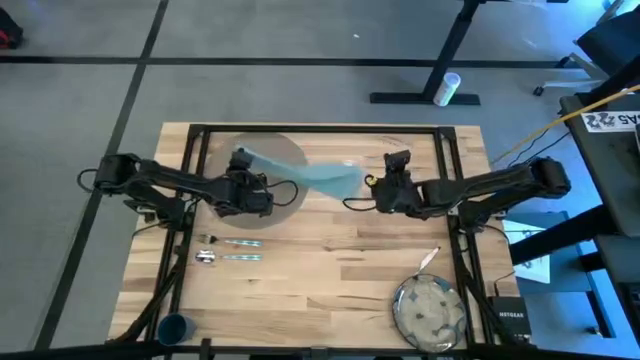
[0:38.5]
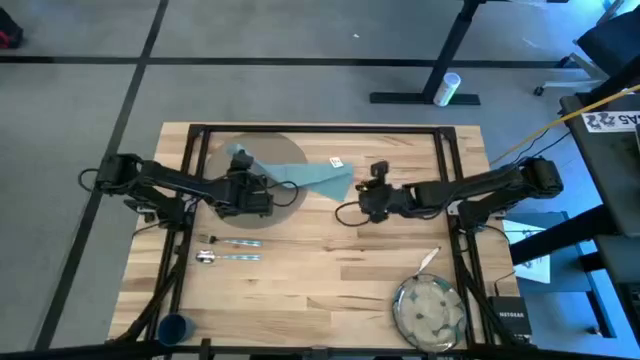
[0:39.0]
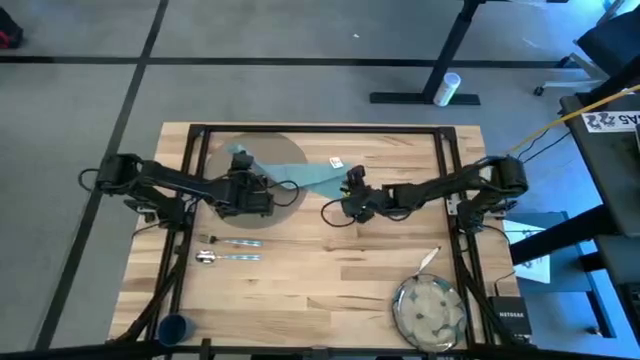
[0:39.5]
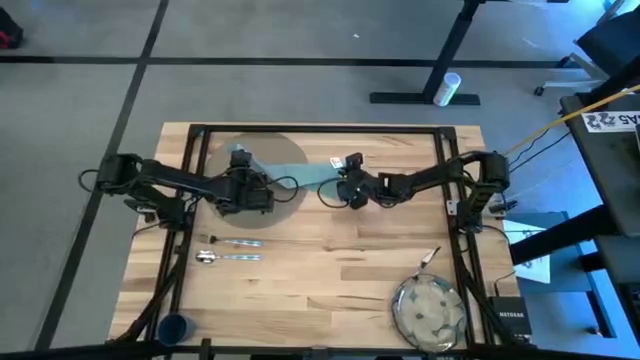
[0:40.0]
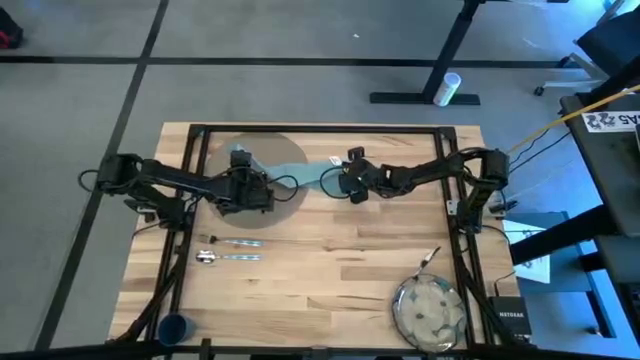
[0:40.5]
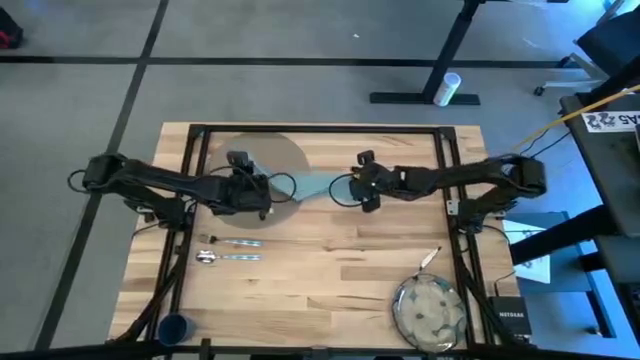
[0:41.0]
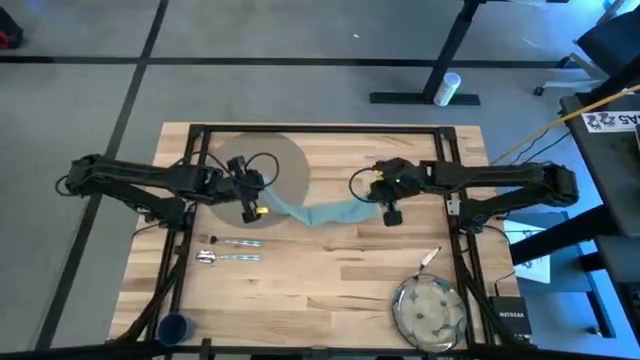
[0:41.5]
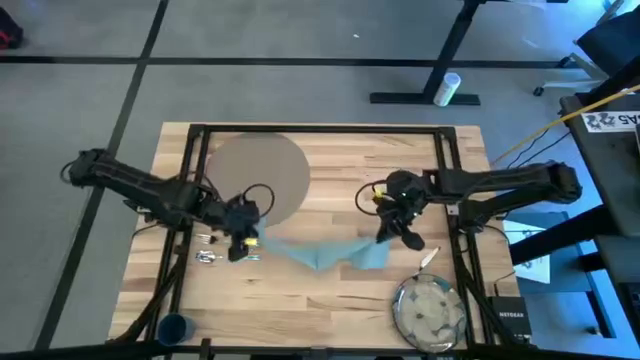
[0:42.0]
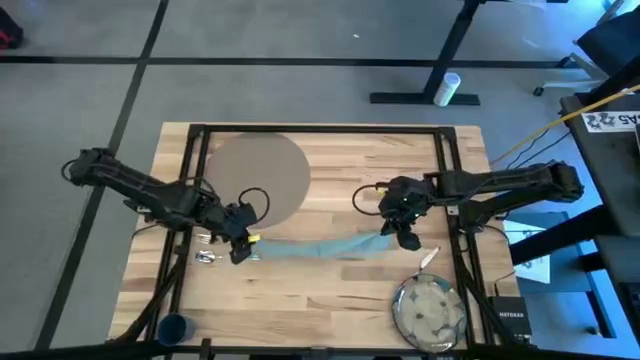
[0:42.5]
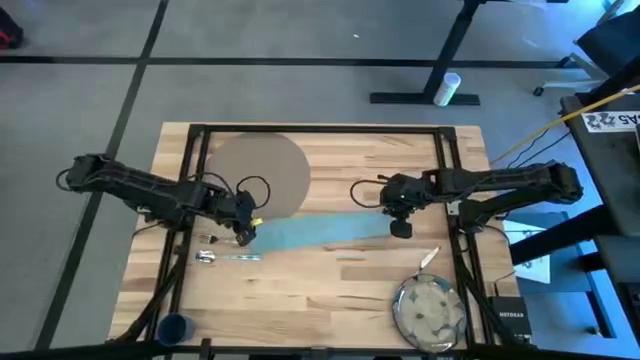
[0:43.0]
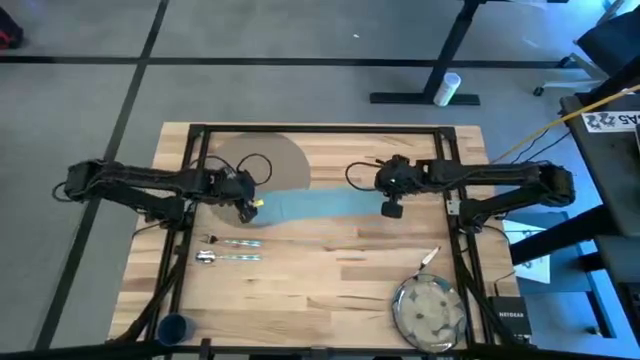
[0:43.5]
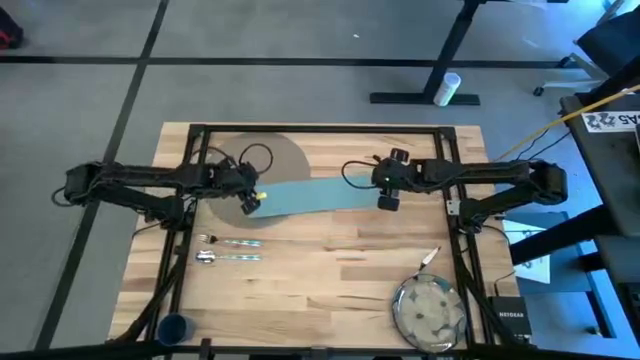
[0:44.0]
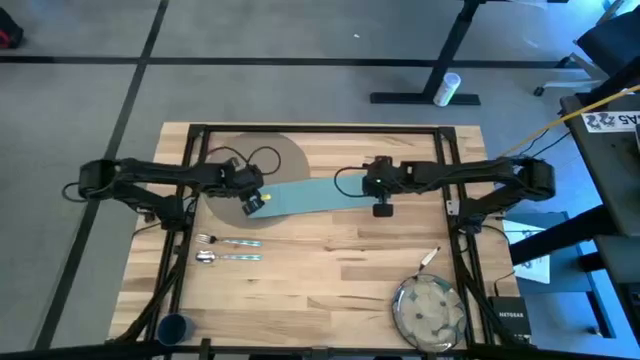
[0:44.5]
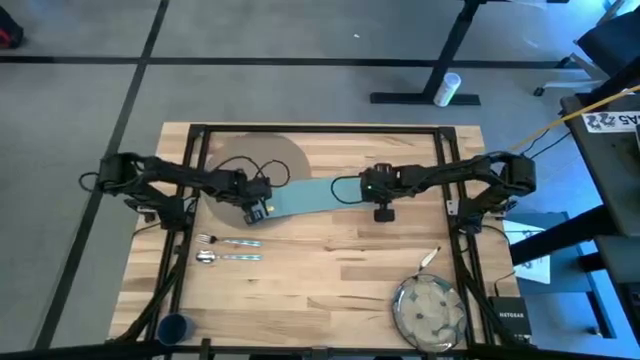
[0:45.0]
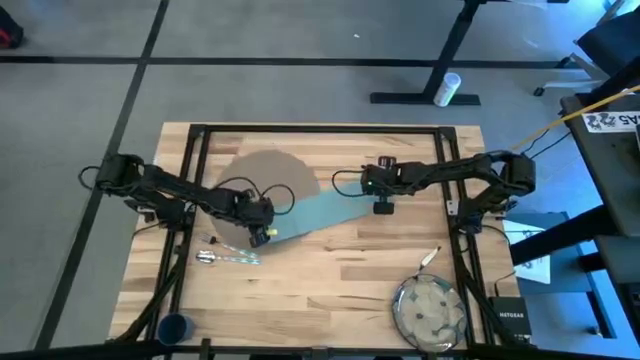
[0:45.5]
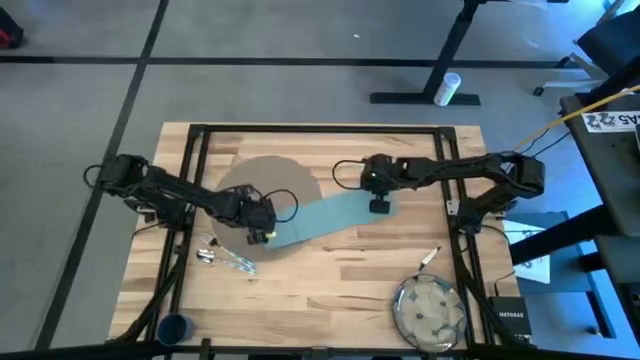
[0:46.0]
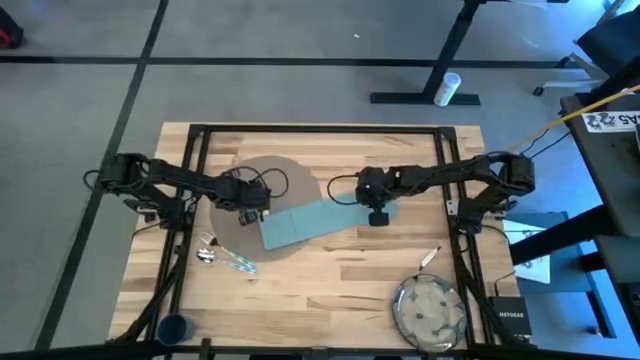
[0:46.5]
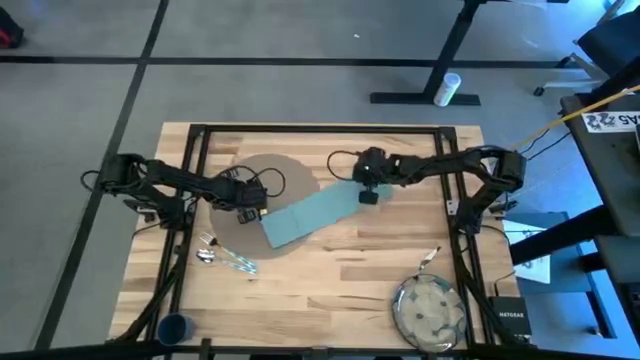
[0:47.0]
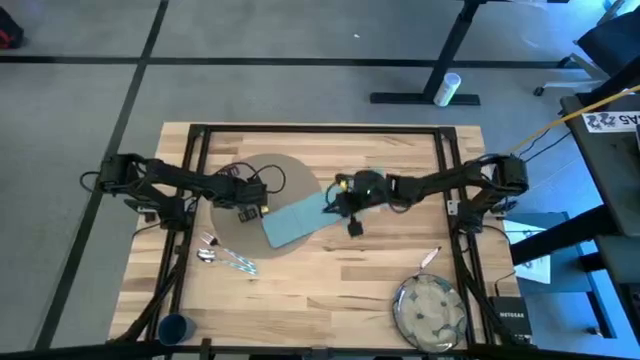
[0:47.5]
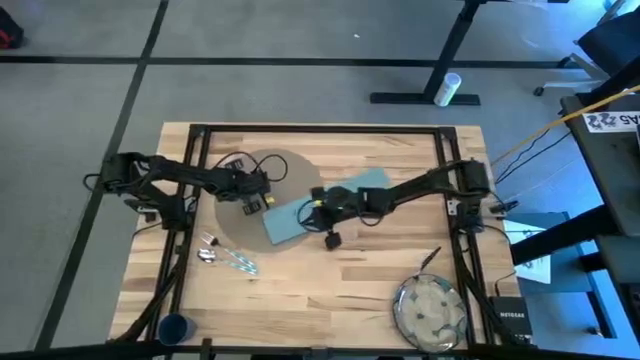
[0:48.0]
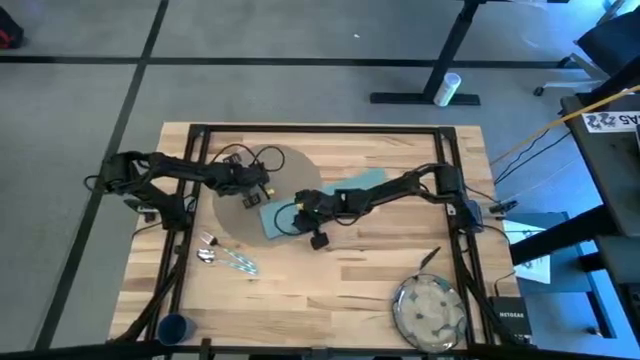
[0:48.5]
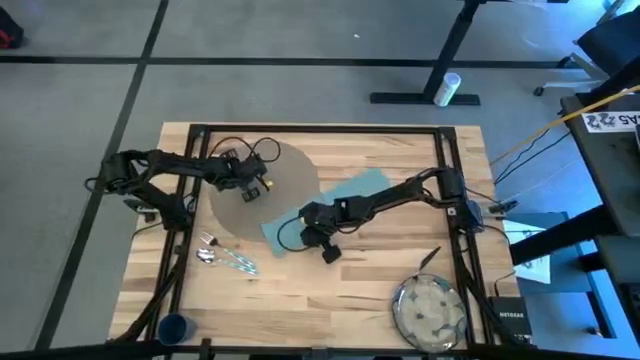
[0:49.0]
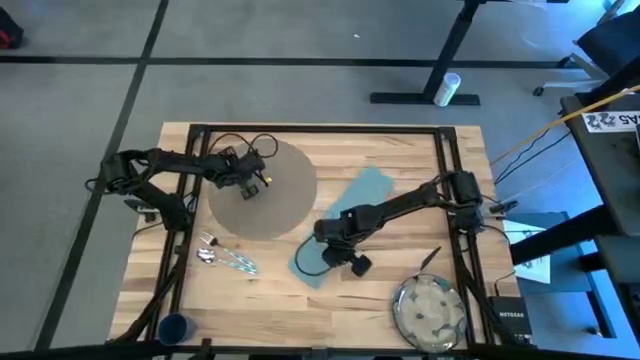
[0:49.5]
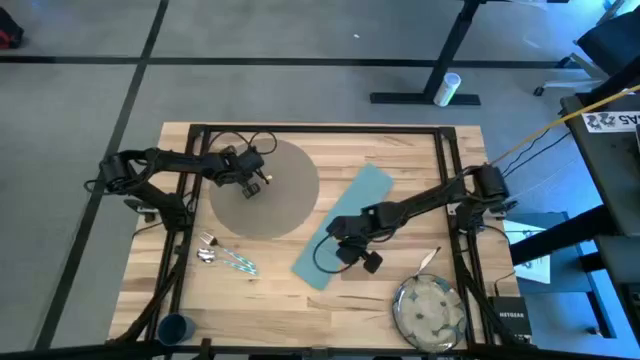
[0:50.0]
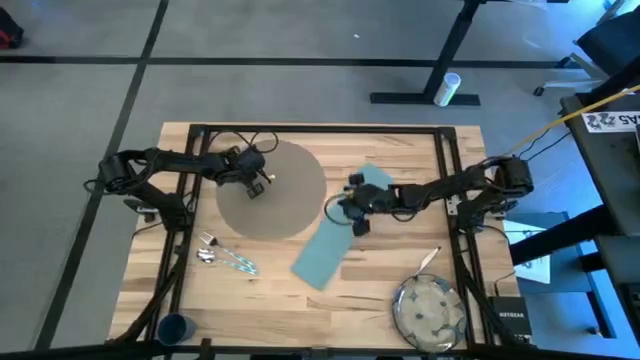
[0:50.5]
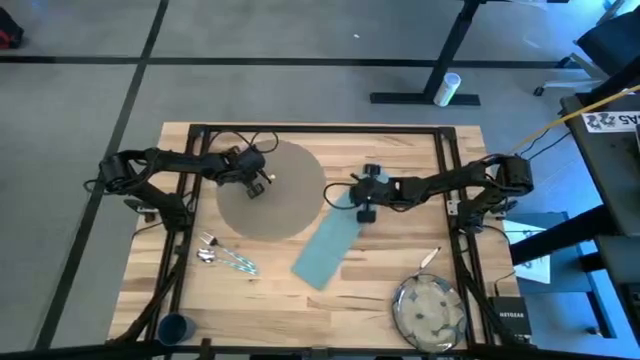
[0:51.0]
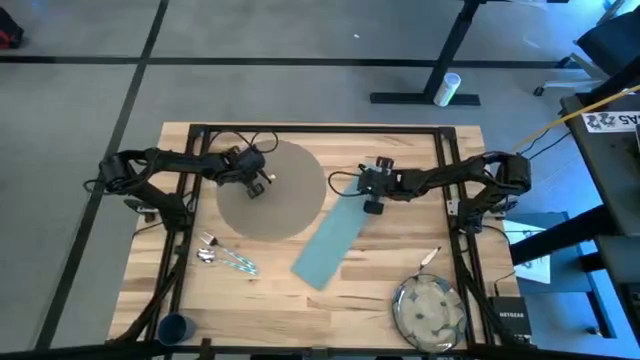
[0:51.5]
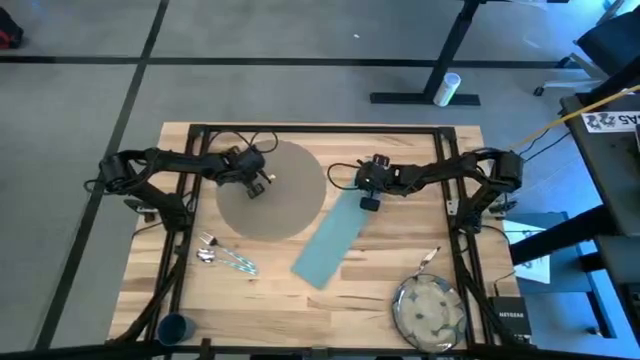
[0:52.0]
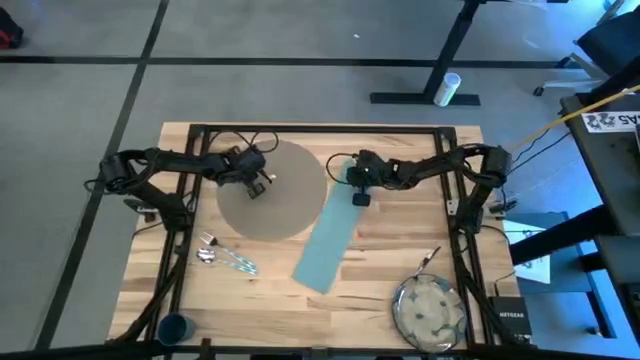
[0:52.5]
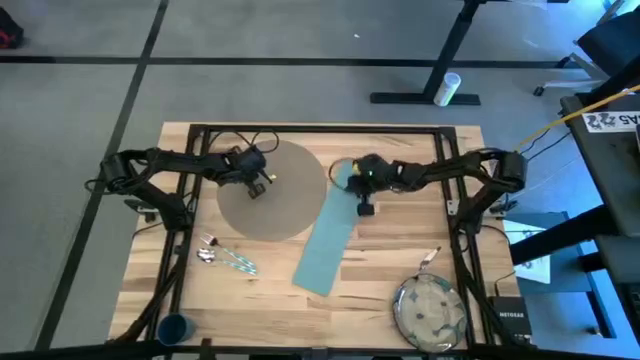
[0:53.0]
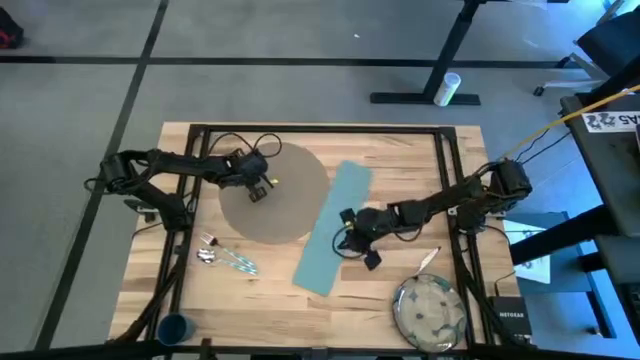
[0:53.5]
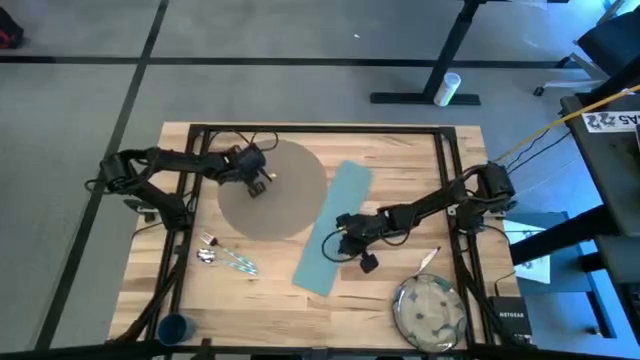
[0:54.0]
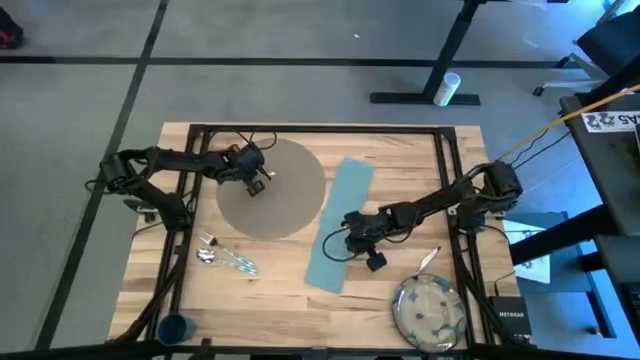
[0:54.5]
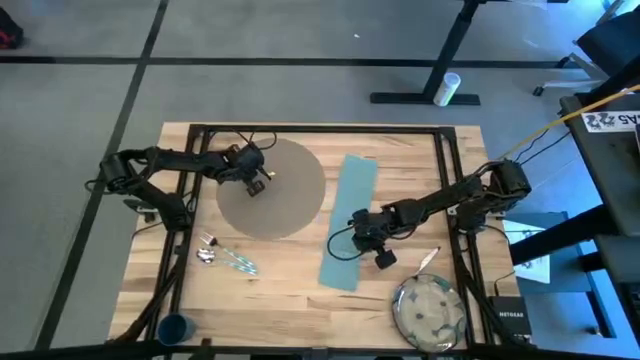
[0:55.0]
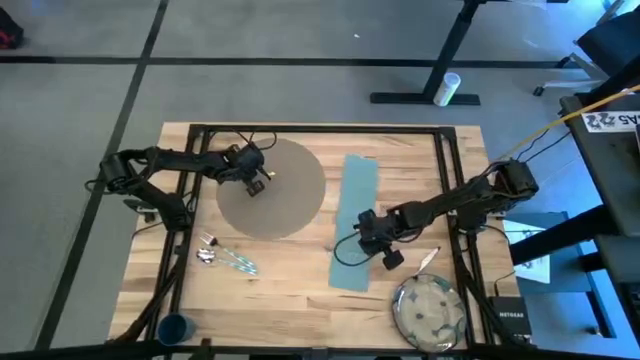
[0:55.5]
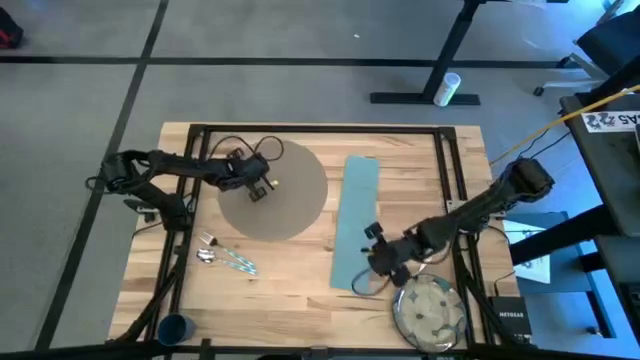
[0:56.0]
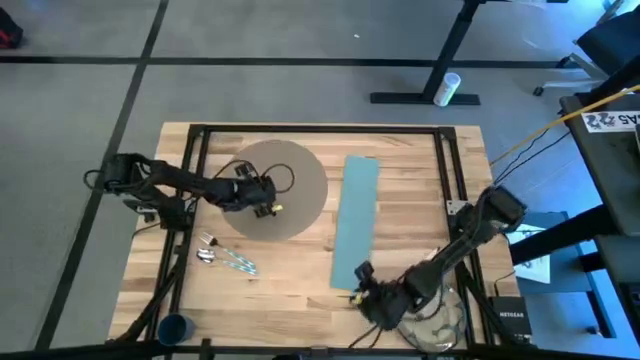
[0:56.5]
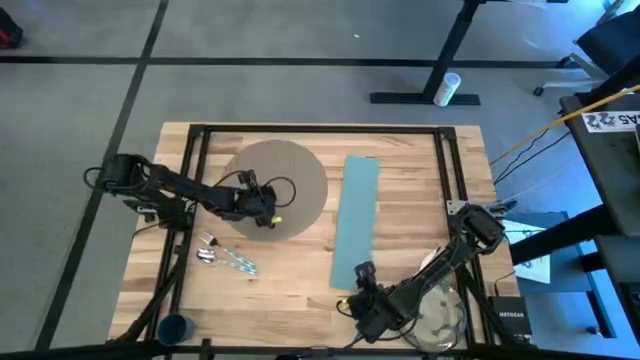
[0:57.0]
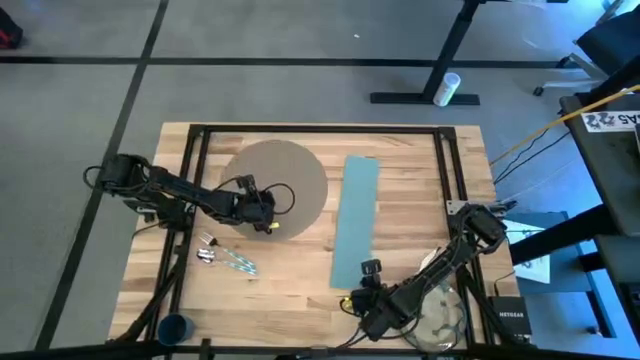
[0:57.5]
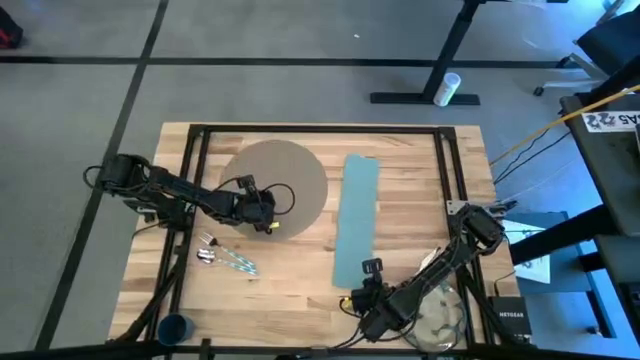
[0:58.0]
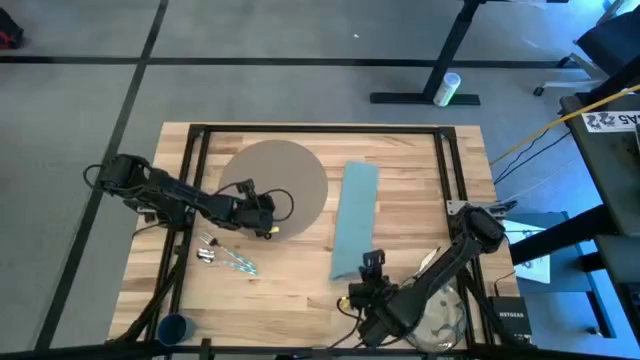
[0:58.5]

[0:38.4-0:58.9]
Task: Set table place
Fold the blue table napkin
